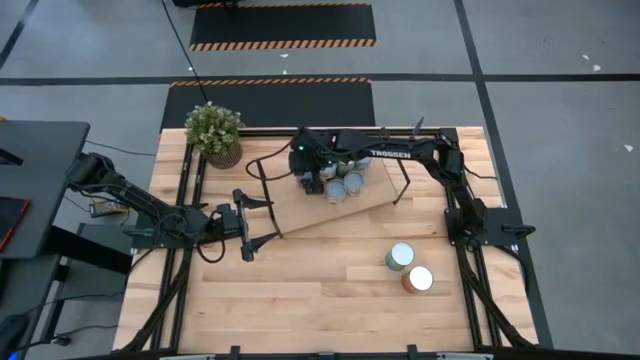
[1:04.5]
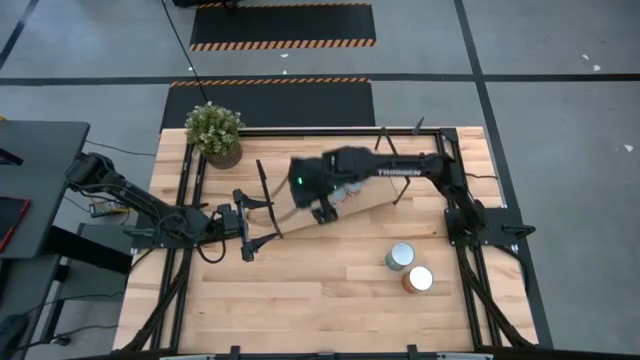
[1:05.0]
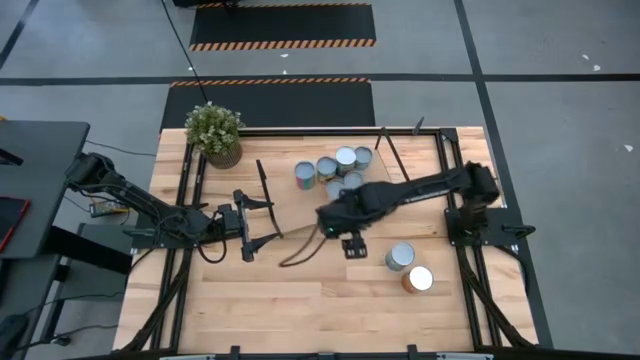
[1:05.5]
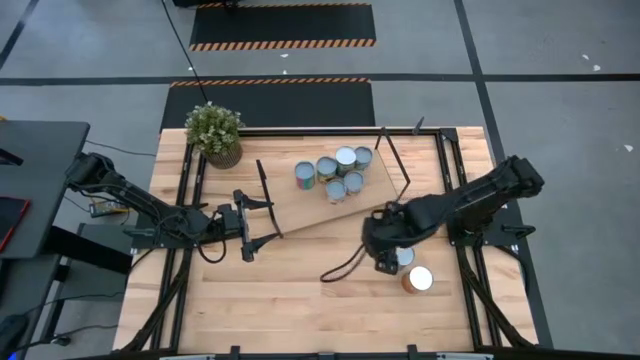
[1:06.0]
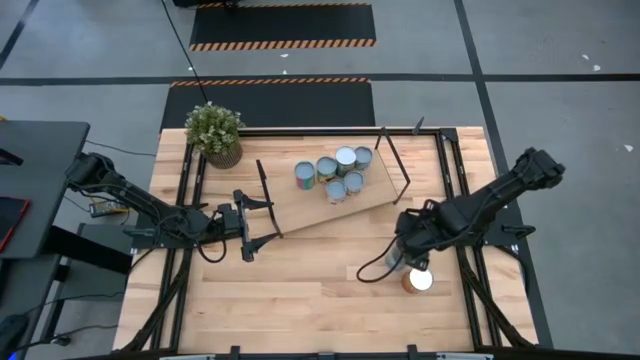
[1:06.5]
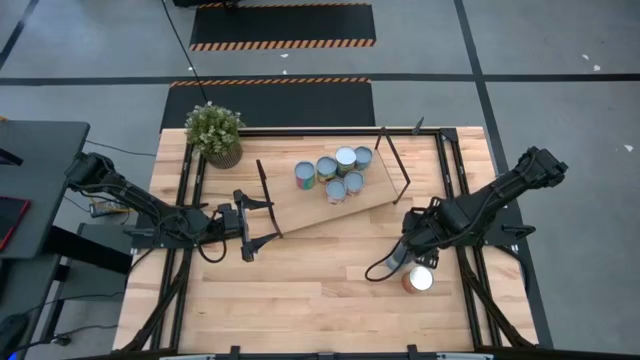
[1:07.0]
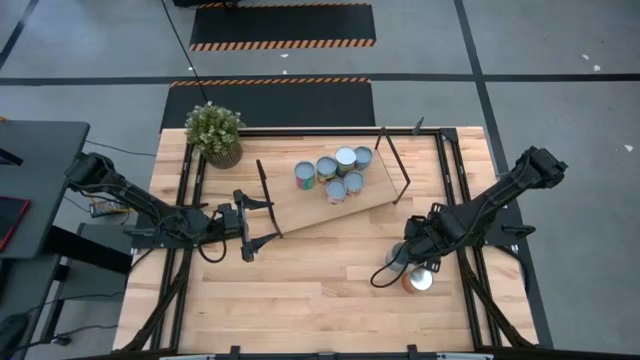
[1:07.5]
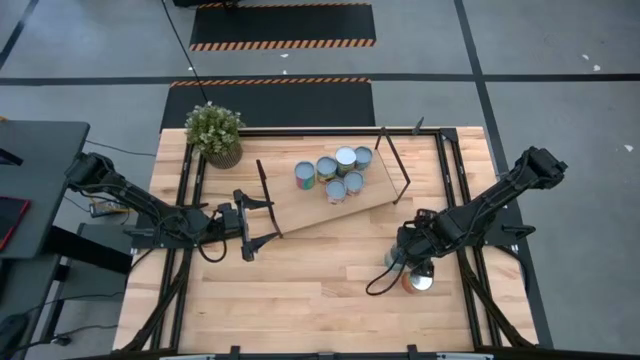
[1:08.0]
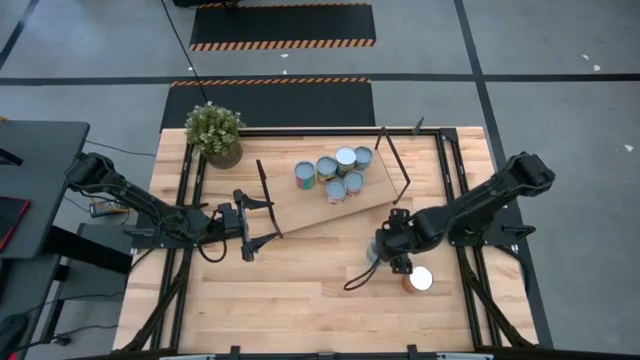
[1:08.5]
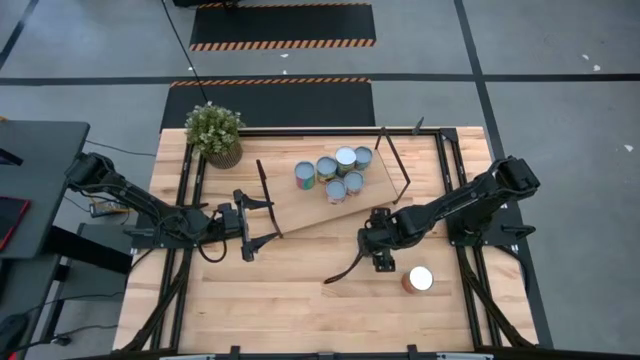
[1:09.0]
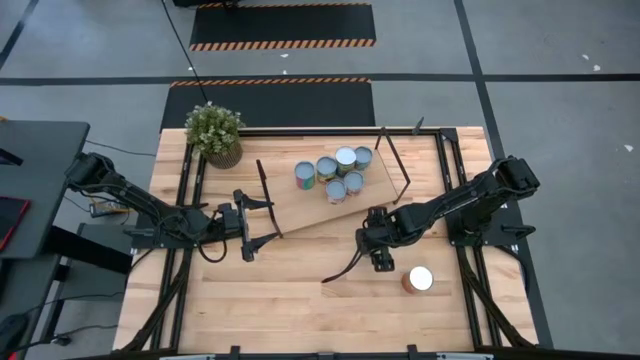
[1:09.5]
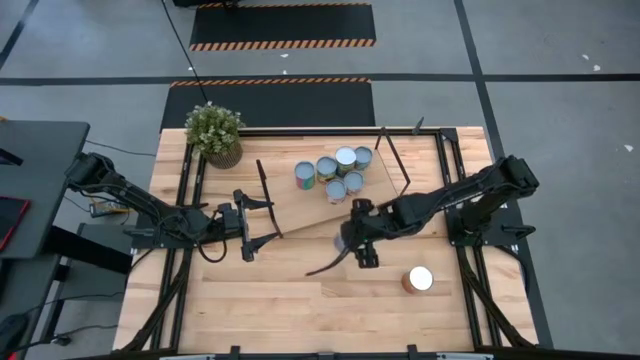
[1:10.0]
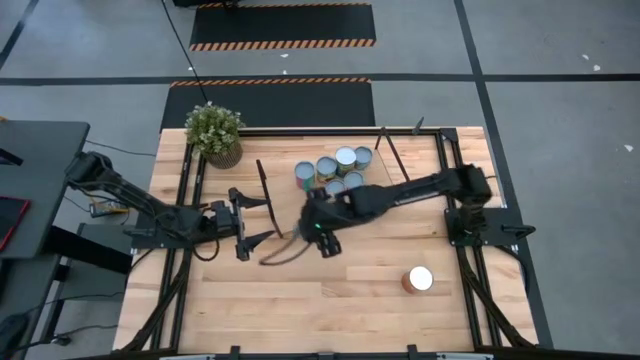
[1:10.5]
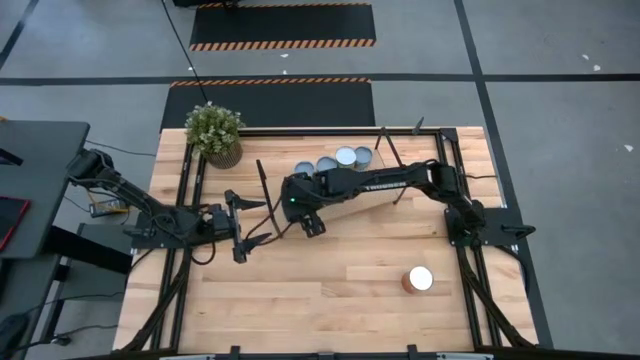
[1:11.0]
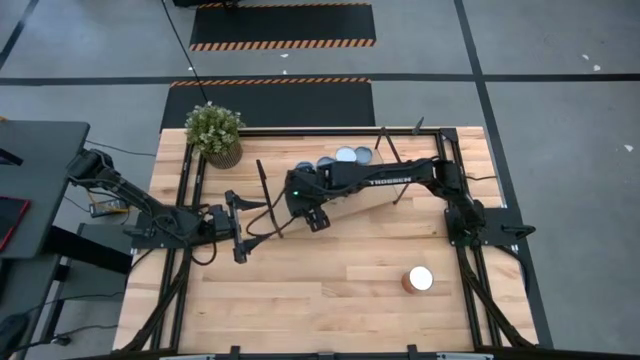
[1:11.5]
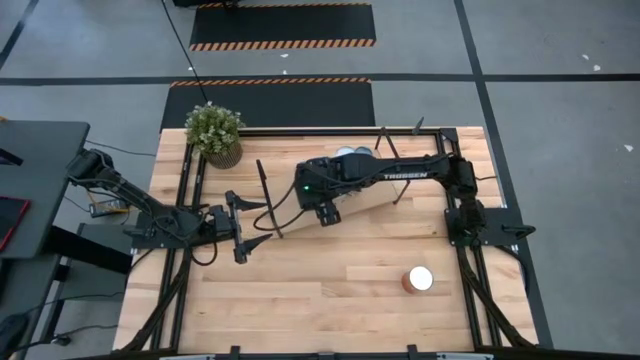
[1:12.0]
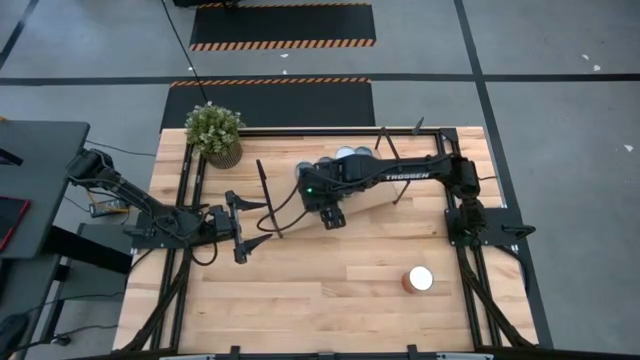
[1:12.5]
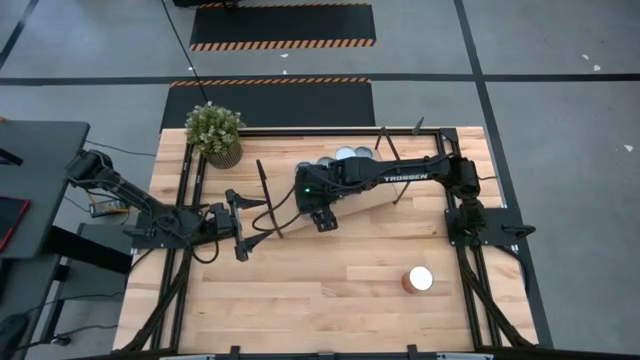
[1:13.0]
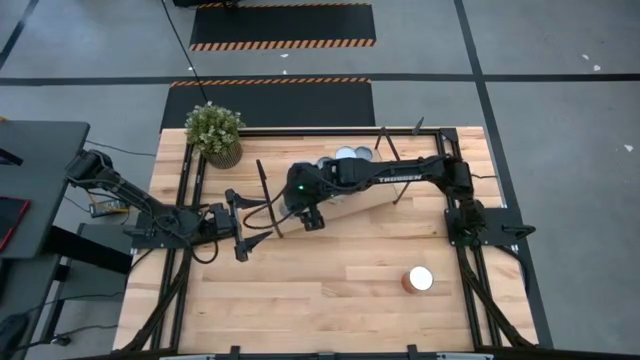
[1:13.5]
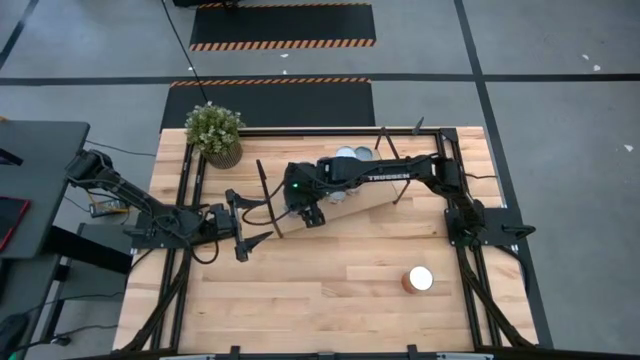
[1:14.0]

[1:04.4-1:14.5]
Task: Pick and place cans onto a shelf
Put the blue can on the shelf

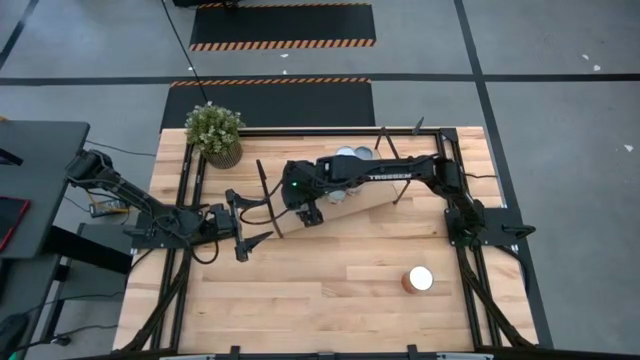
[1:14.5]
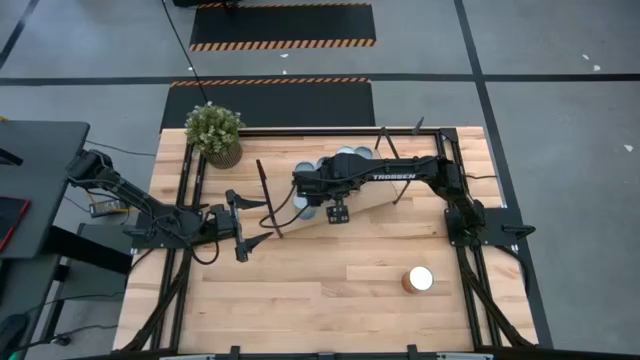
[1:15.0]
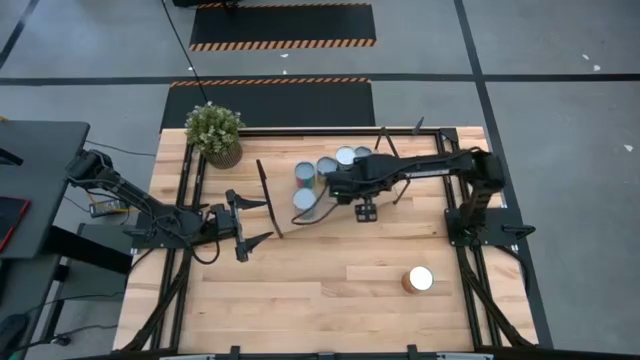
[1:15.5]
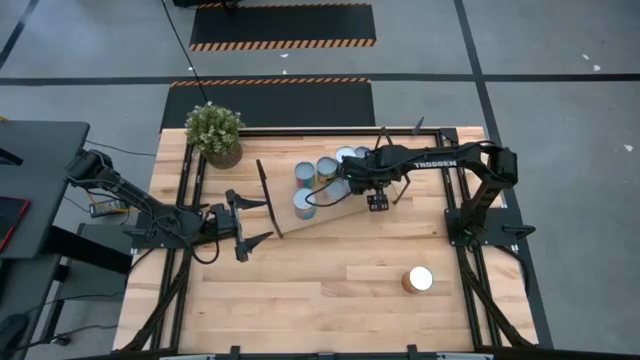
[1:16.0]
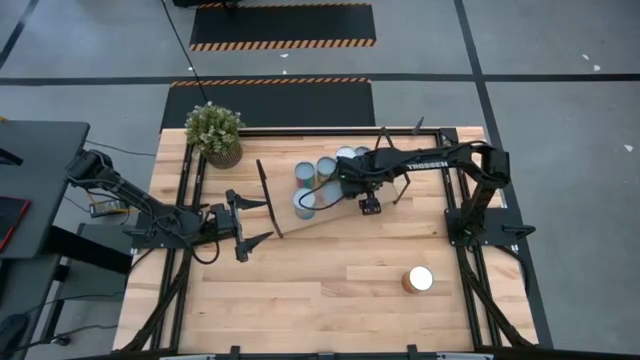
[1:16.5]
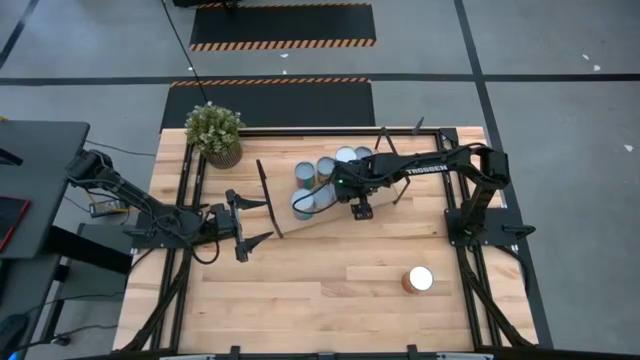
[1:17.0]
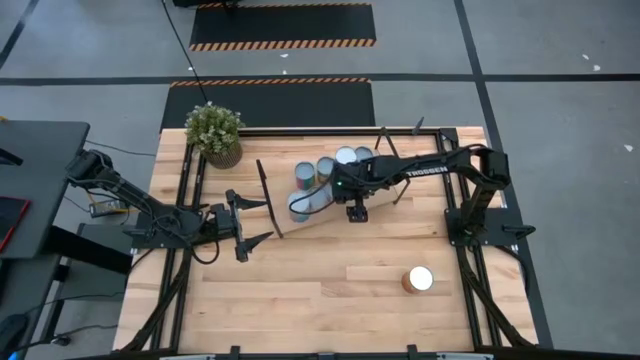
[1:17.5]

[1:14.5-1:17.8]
Adjust the red soda cans

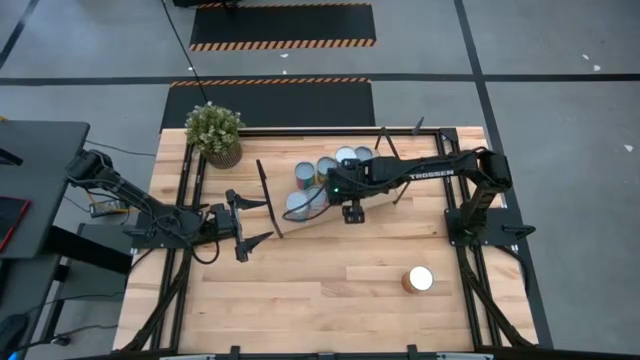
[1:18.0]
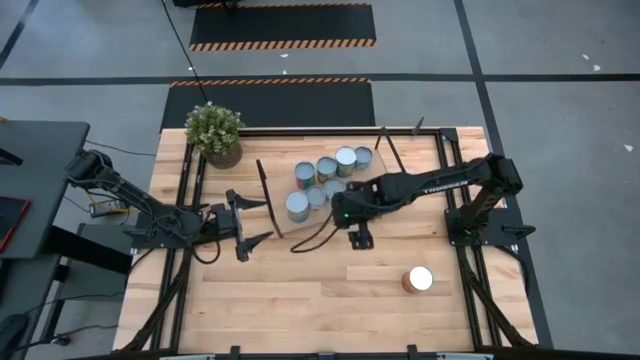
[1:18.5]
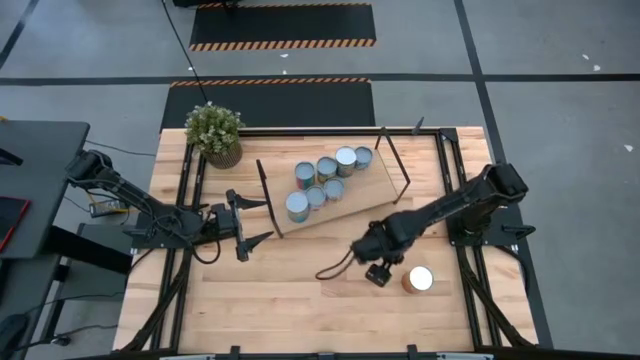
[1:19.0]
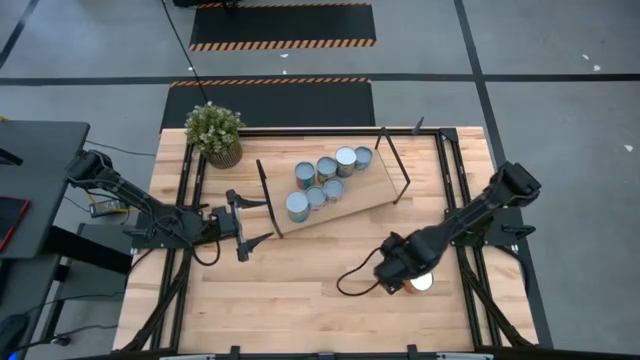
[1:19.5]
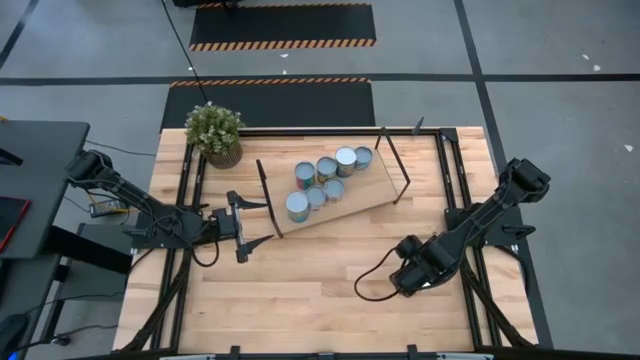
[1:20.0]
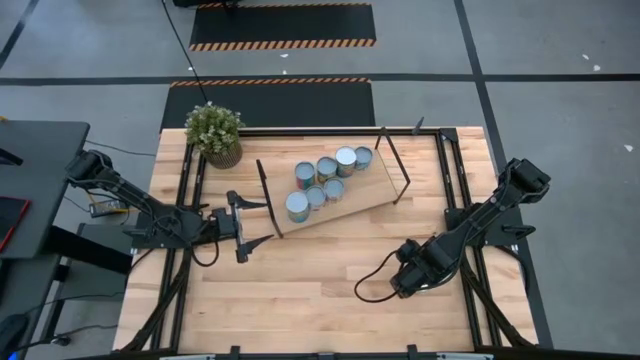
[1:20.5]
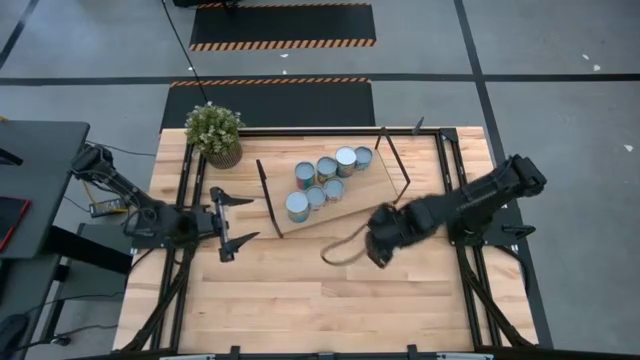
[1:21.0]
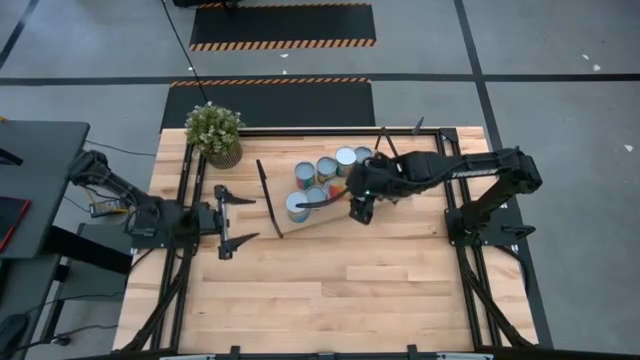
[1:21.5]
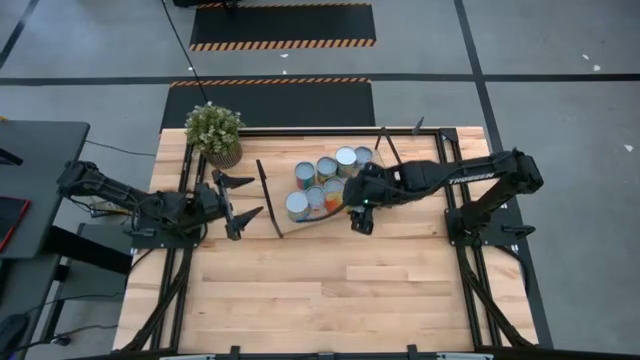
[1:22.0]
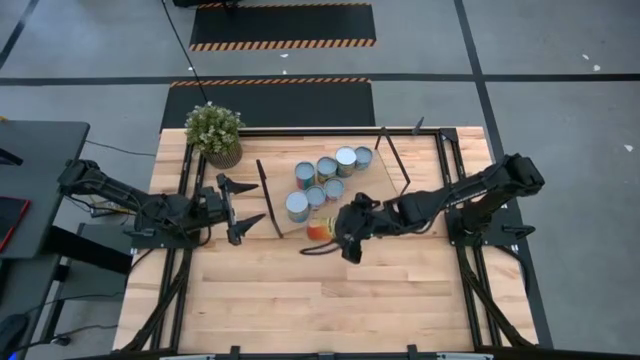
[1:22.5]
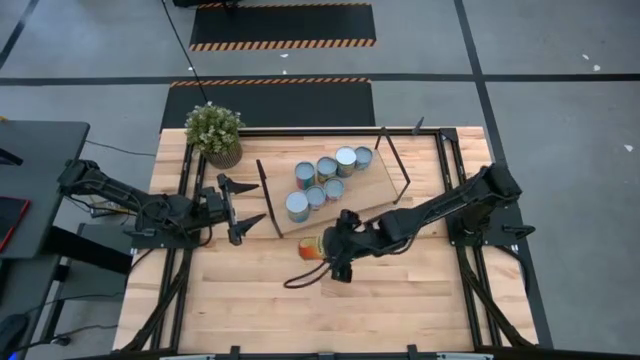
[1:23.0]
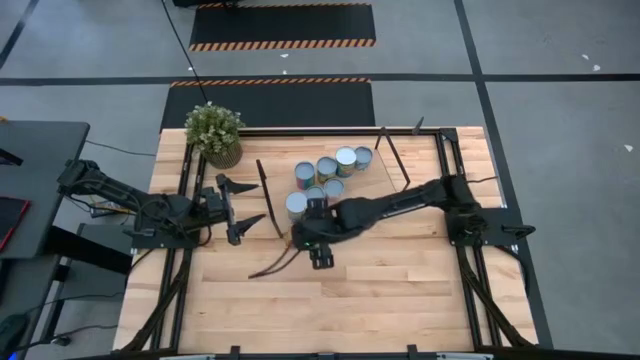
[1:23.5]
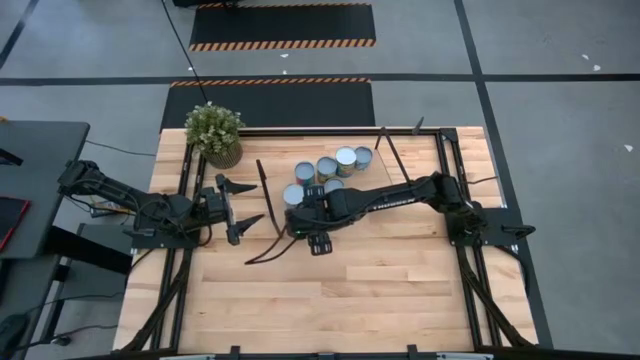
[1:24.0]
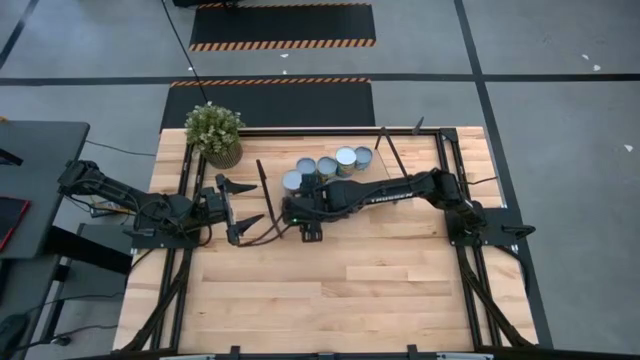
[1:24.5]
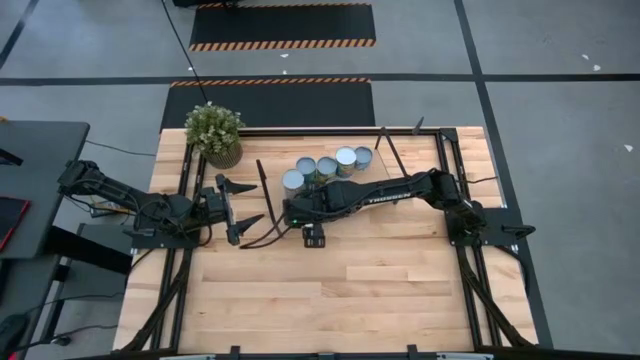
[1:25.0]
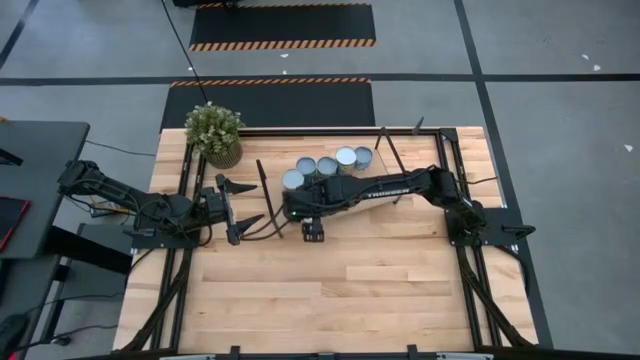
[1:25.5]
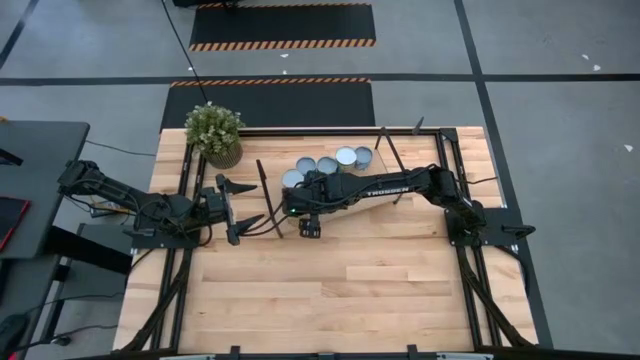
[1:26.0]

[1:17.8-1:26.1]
Put the orange can on the shelf aligned with the other blue can
